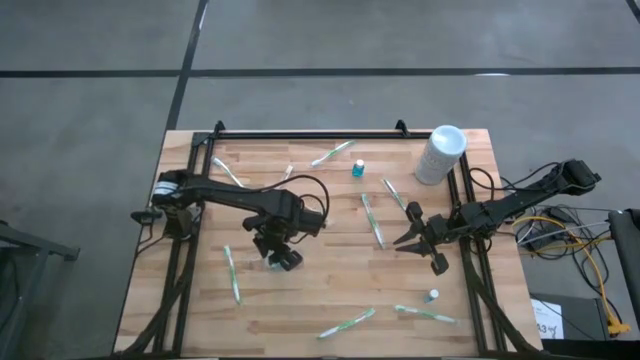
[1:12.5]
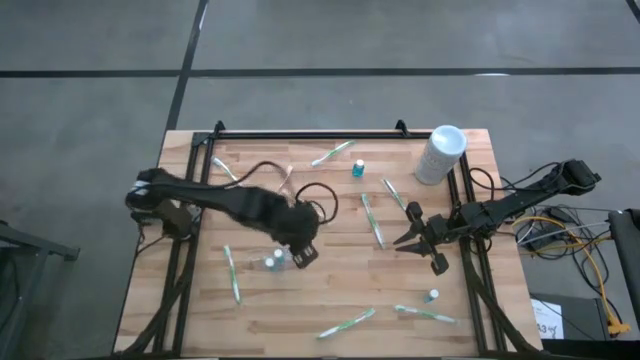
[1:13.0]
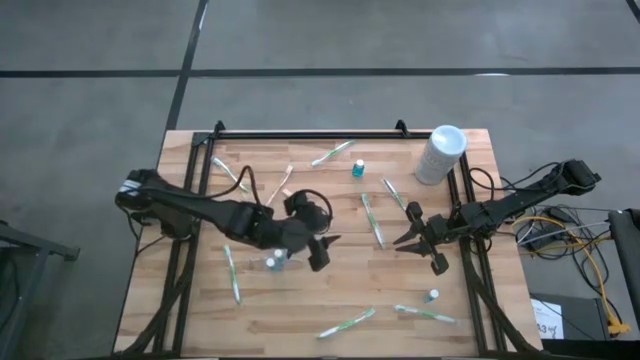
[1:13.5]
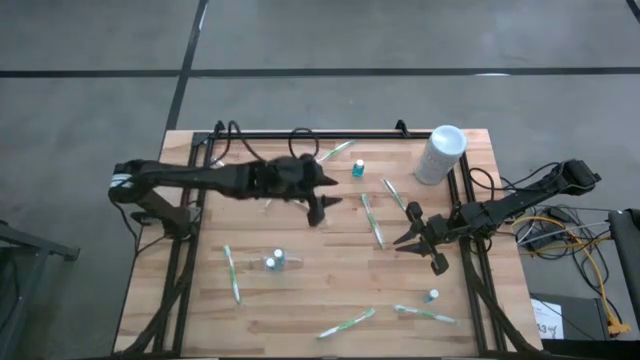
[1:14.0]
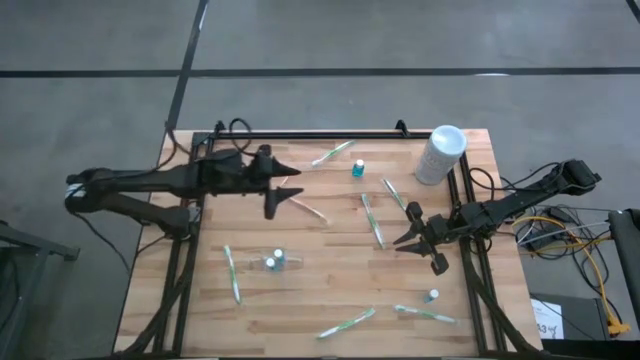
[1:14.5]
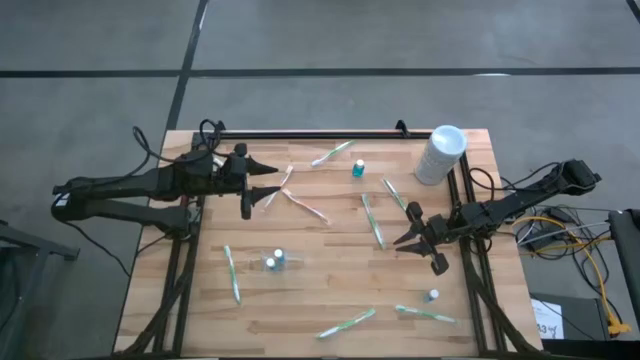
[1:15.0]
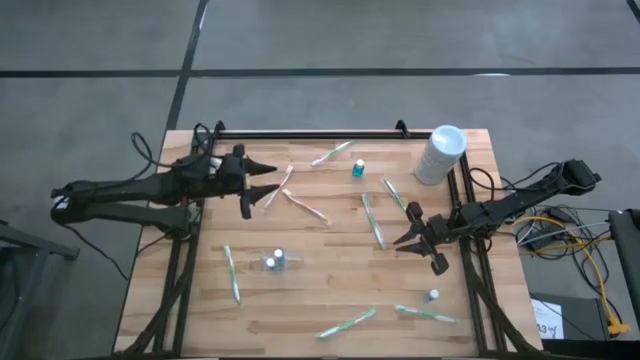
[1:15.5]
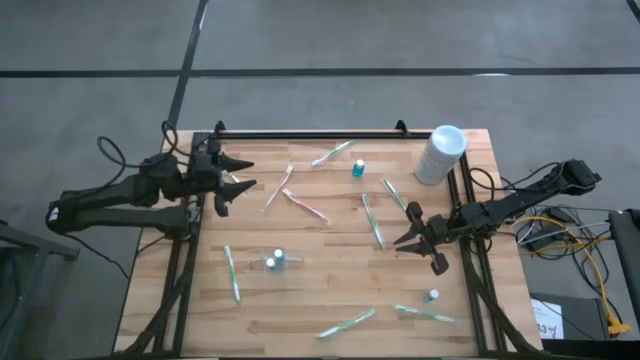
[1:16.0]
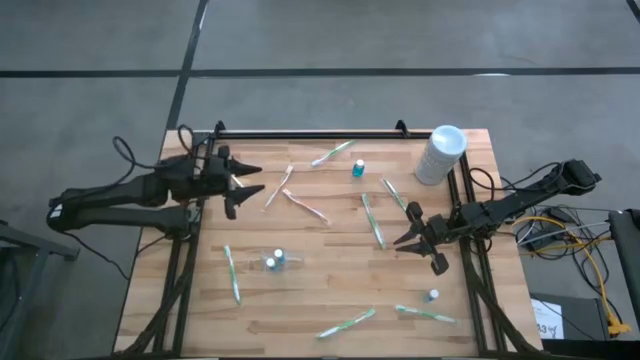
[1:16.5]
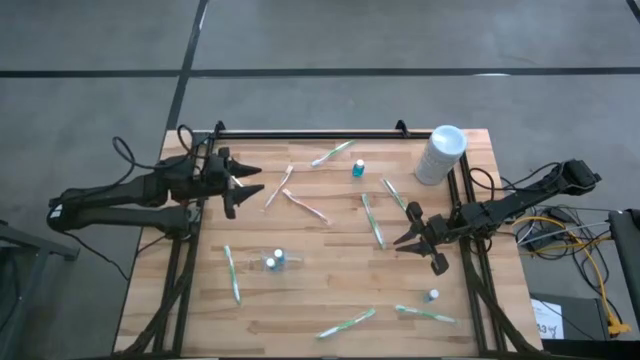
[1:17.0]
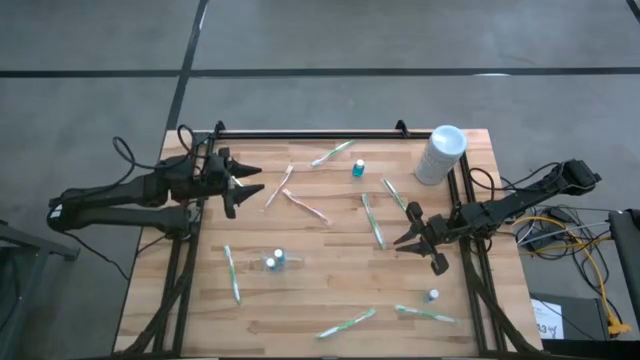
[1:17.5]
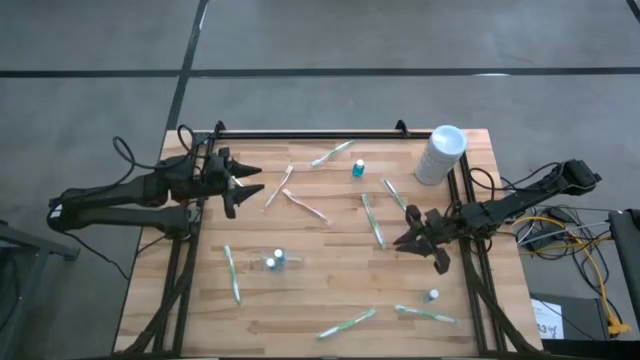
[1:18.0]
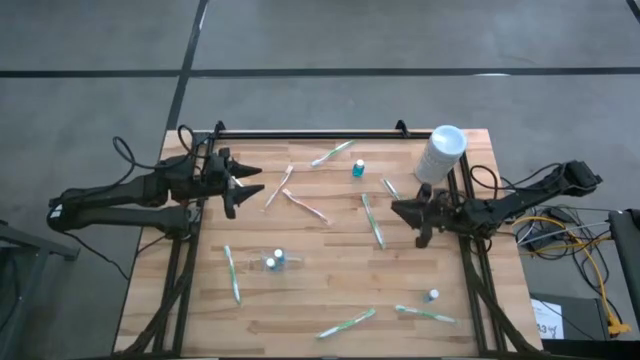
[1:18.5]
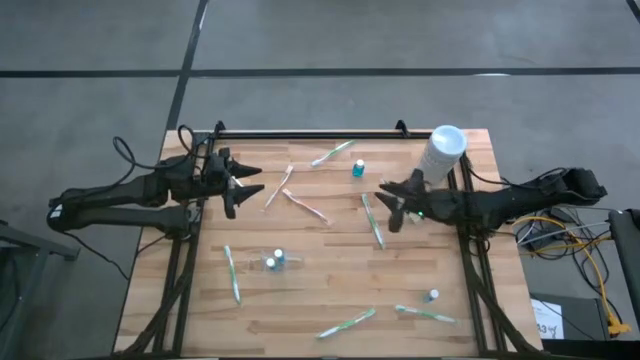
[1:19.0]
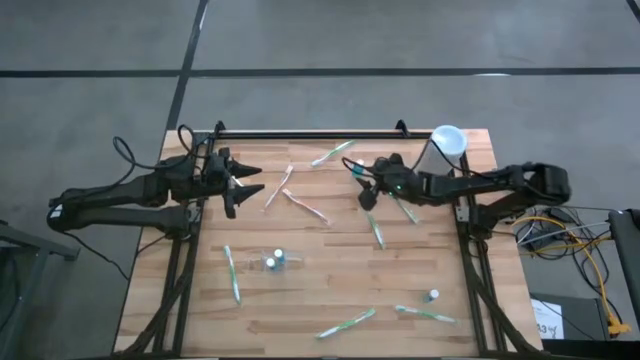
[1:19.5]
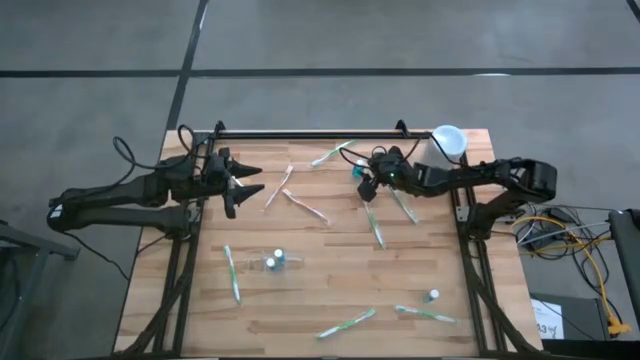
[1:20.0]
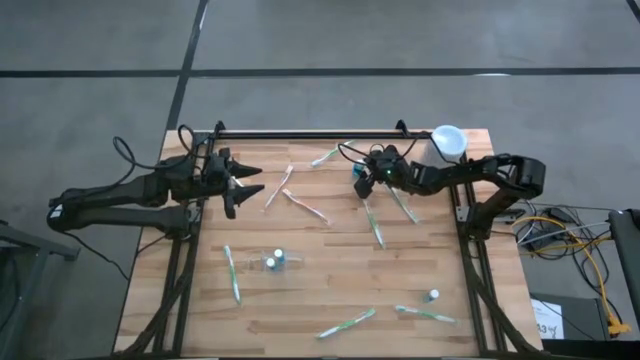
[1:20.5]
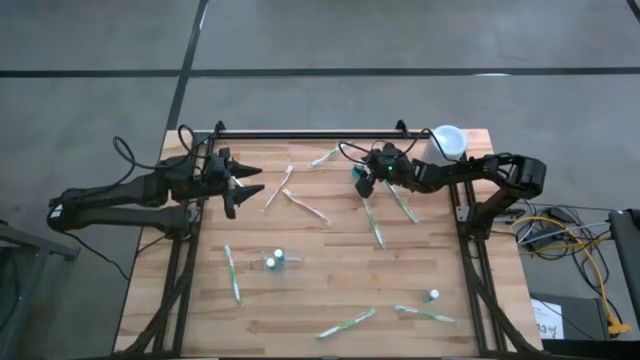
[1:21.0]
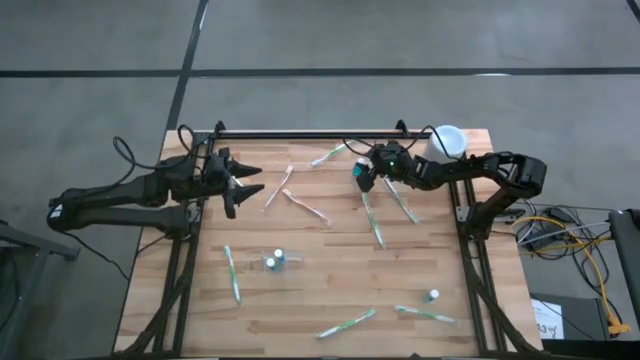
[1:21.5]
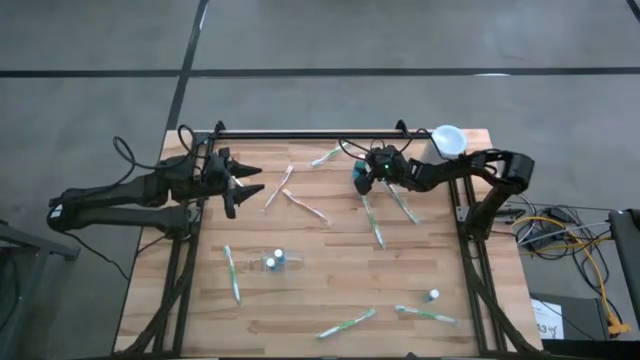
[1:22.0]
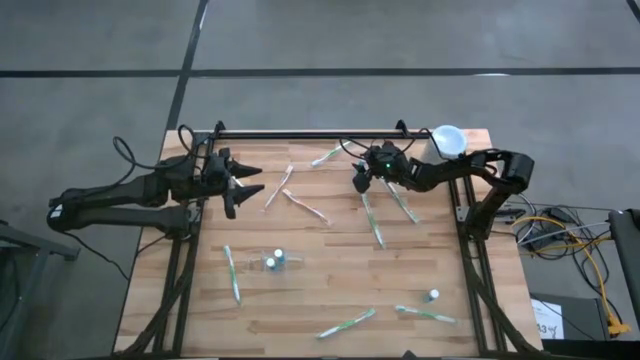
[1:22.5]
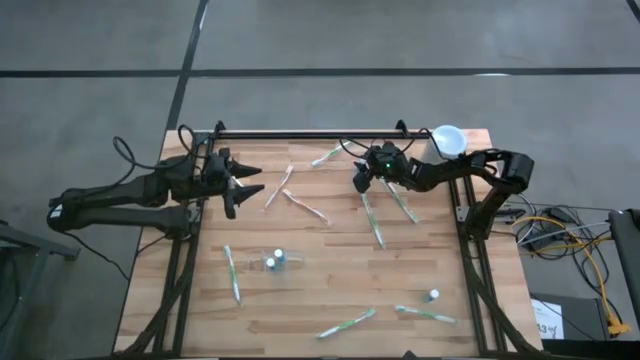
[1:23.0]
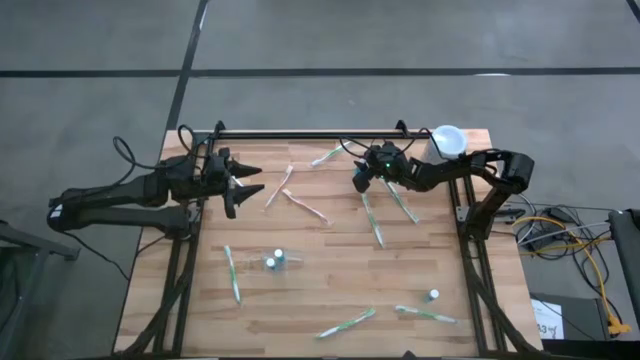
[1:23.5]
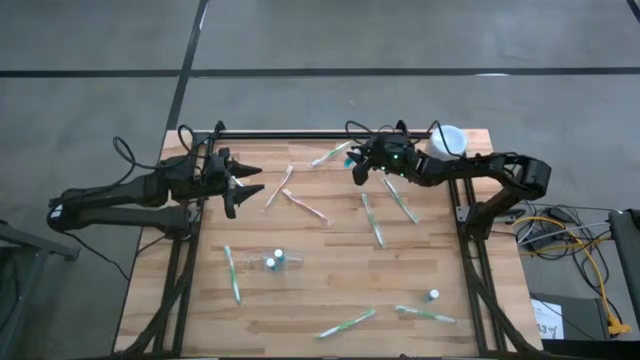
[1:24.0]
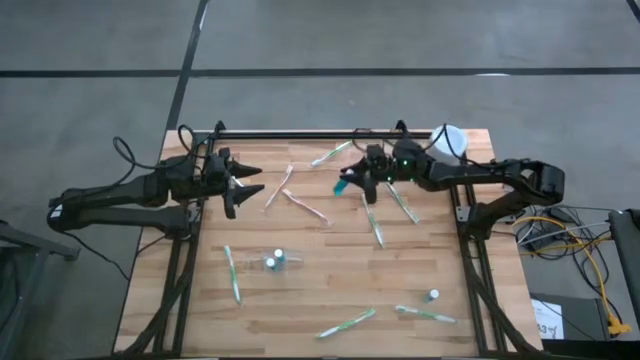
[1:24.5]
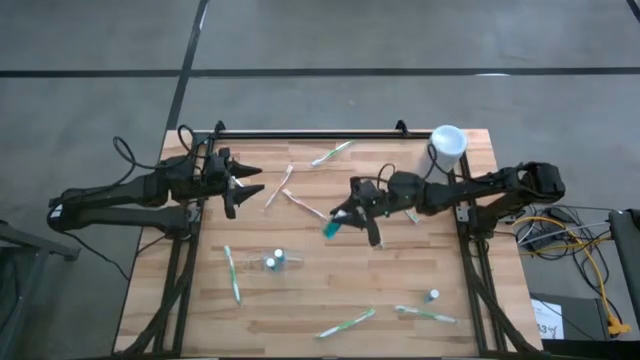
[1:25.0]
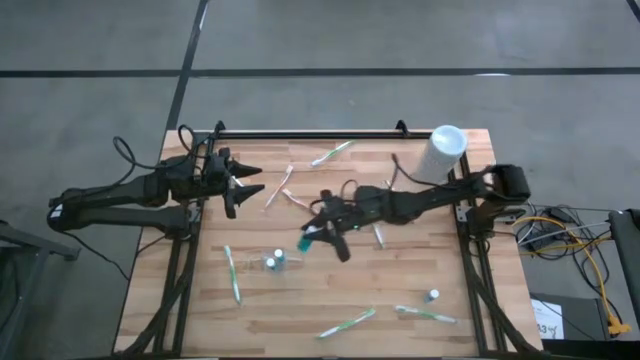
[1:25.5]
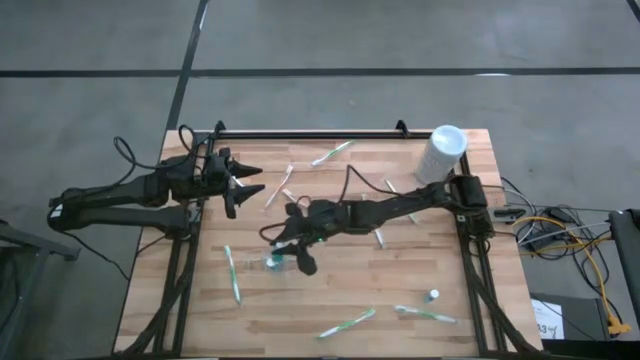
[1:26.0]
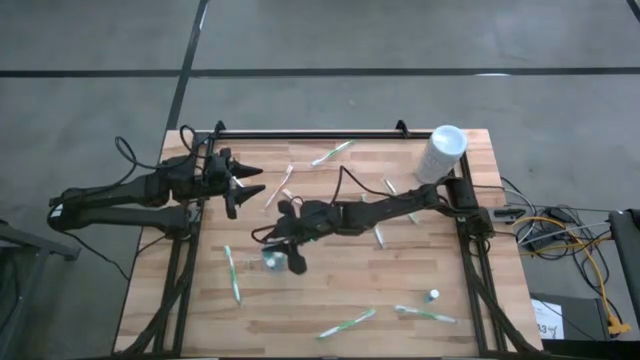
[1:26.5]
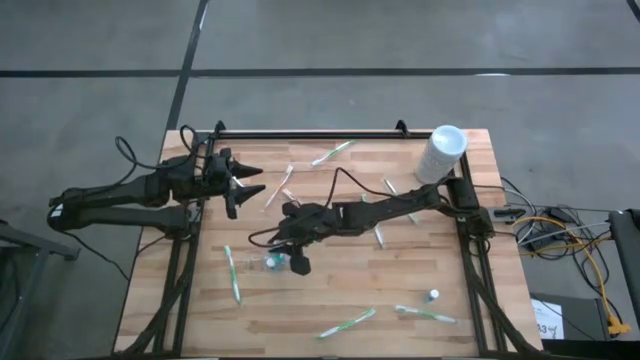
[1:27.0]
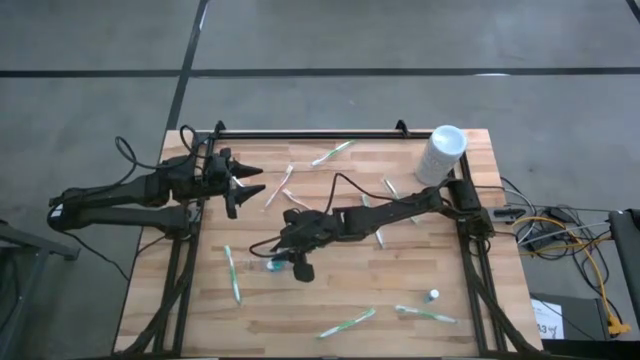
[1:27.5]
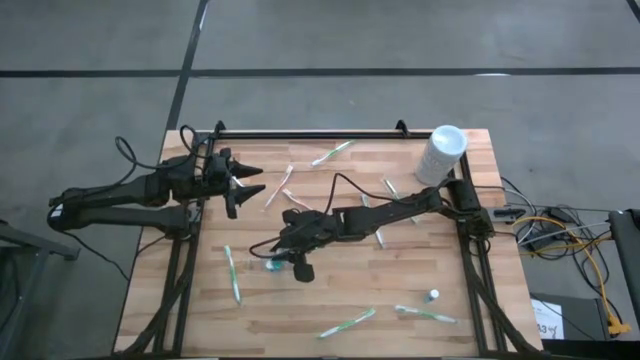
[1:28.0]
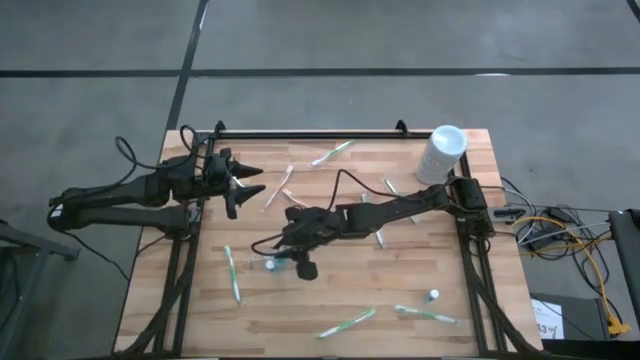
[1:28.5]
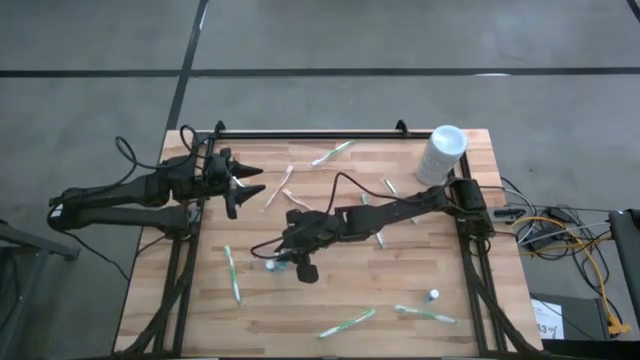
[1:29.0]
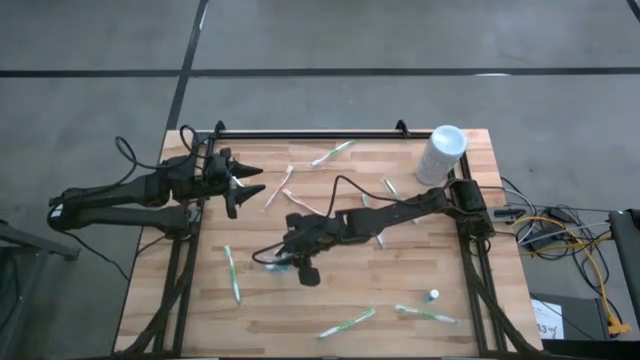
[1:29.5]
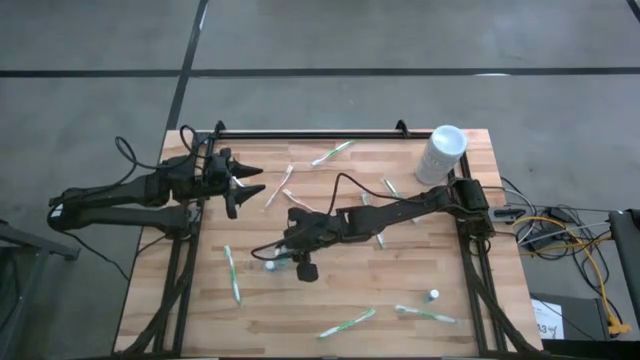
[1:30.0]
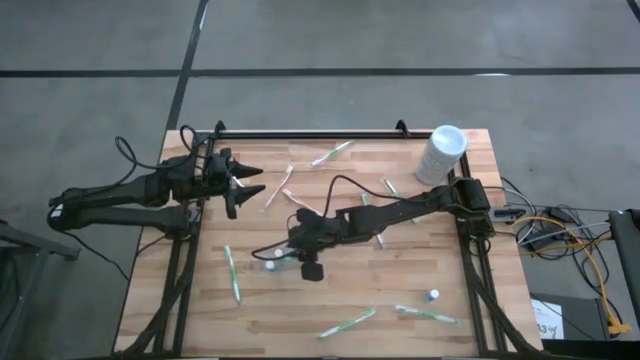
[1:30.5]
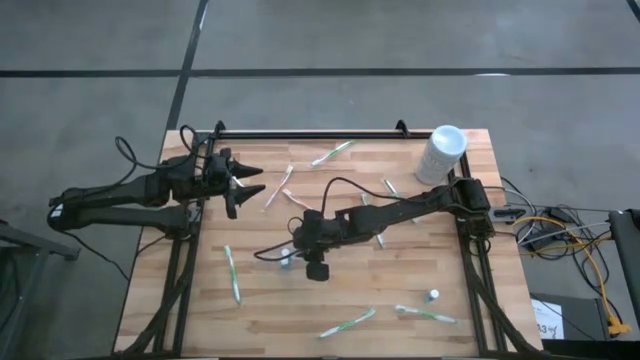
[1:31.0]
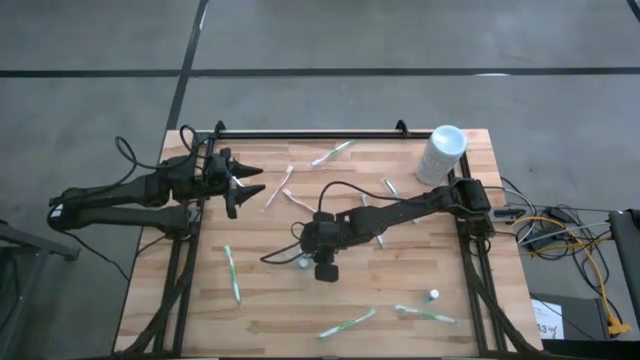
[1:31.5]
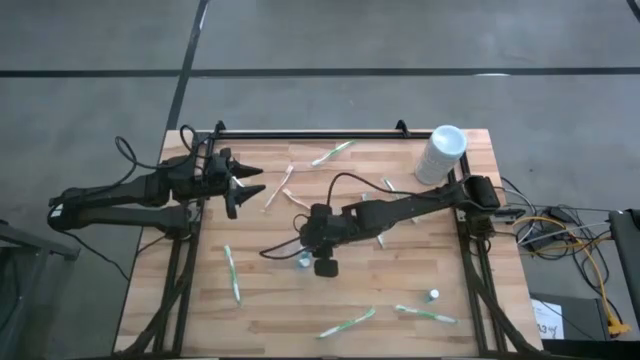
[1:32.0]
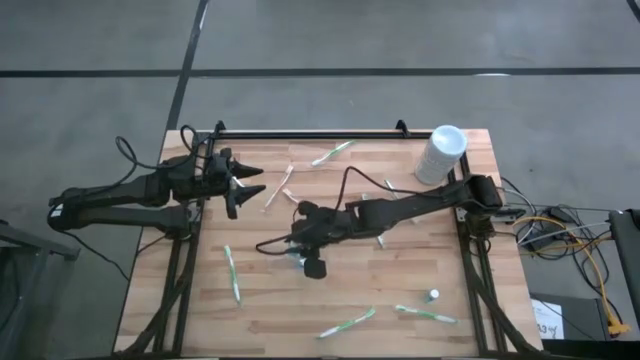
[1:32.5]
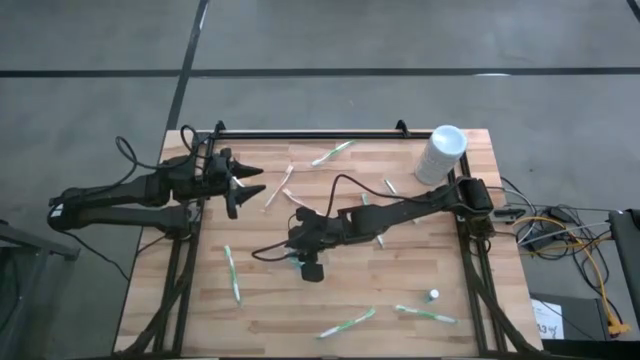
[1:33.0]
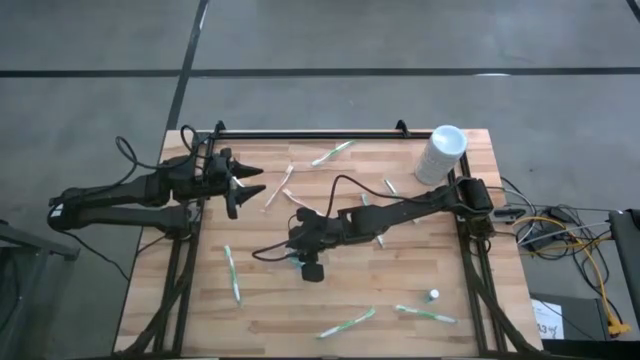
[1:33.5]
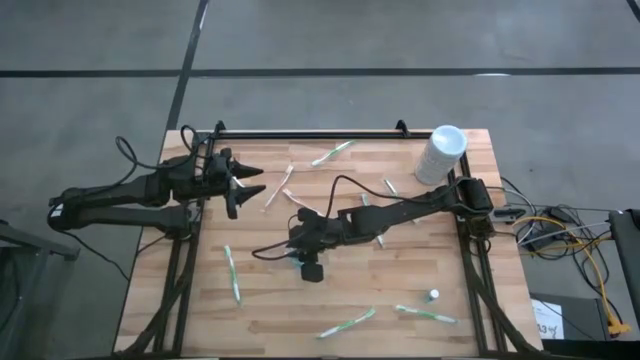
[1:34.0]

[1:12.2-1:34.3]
Task: Pick & Place toothbrushing station
Put the blue mouthwash into the transparent organizer
